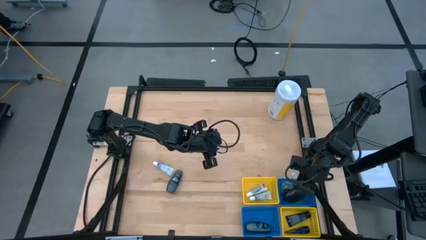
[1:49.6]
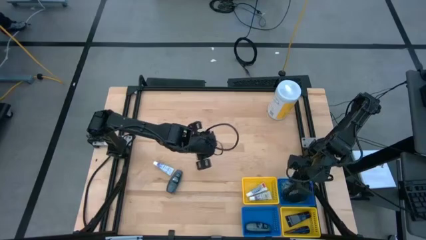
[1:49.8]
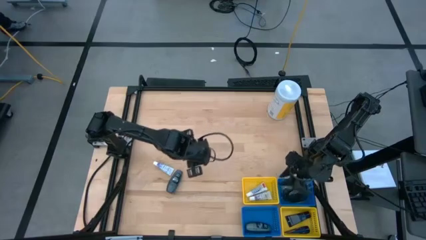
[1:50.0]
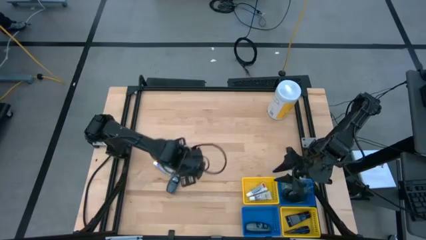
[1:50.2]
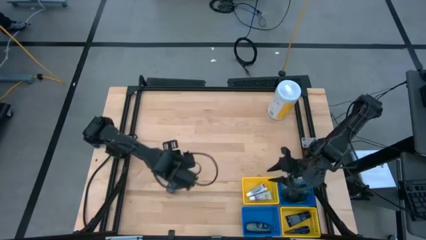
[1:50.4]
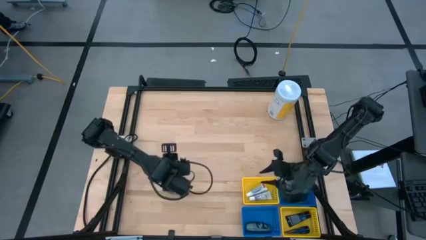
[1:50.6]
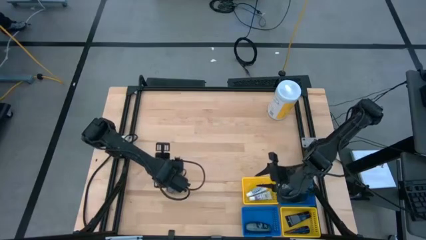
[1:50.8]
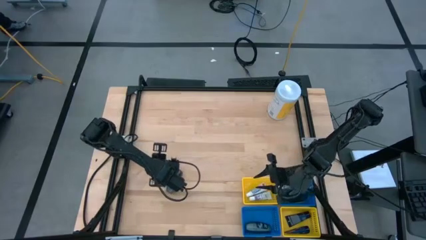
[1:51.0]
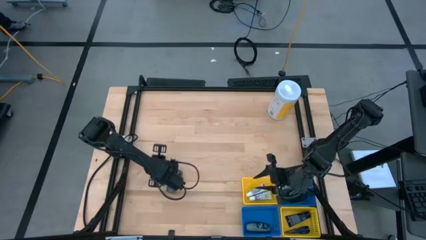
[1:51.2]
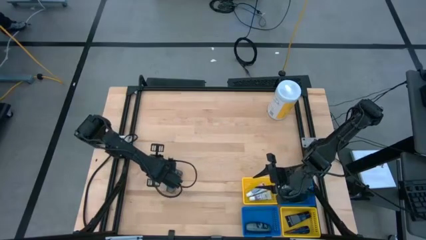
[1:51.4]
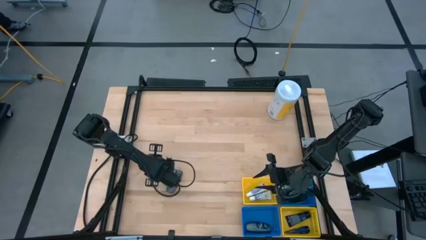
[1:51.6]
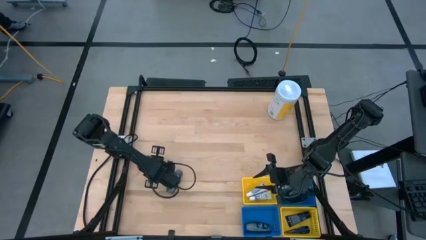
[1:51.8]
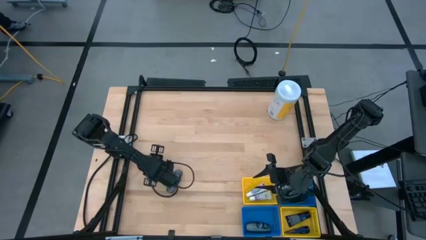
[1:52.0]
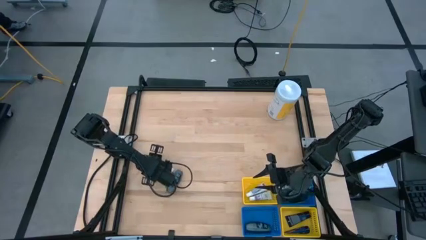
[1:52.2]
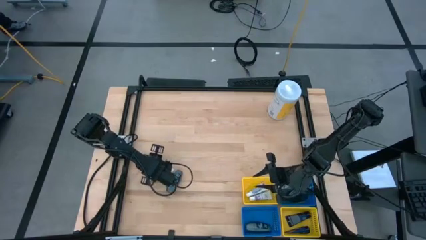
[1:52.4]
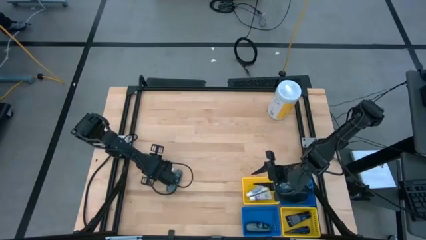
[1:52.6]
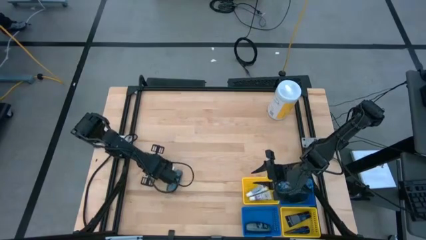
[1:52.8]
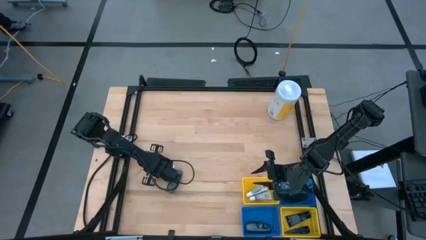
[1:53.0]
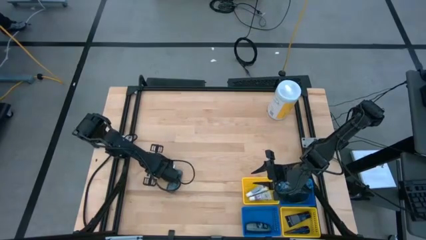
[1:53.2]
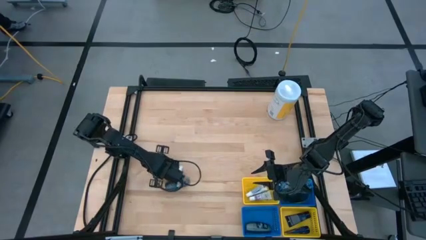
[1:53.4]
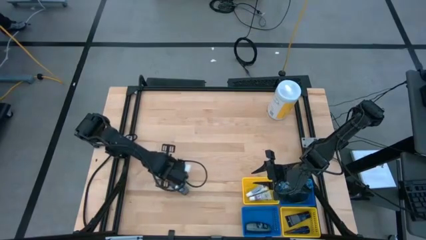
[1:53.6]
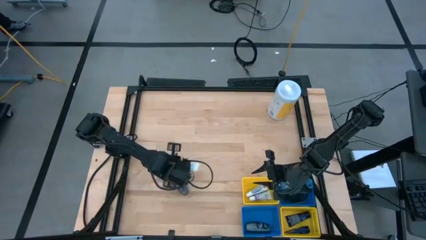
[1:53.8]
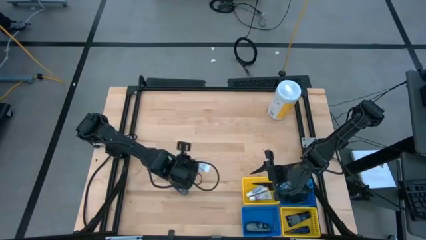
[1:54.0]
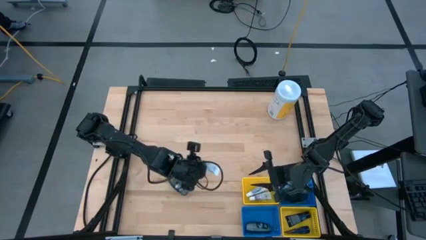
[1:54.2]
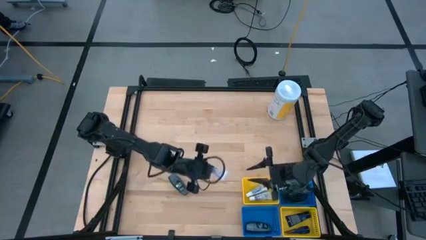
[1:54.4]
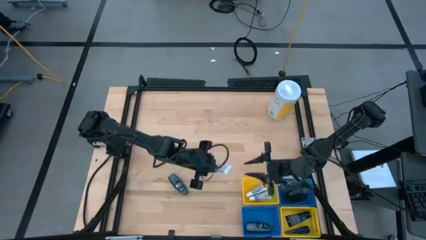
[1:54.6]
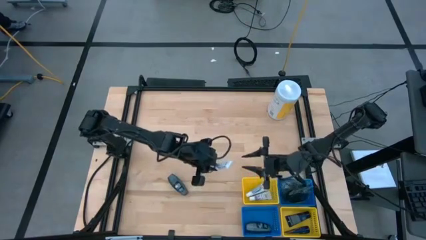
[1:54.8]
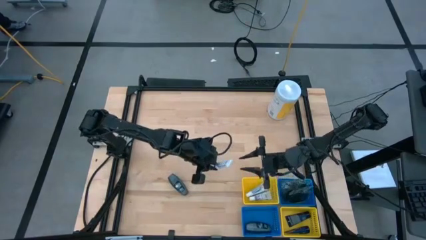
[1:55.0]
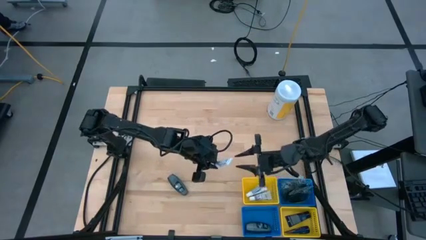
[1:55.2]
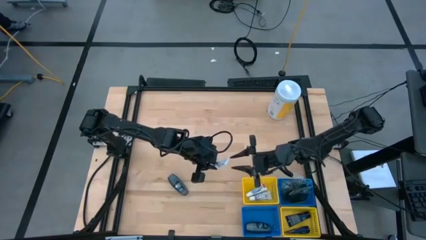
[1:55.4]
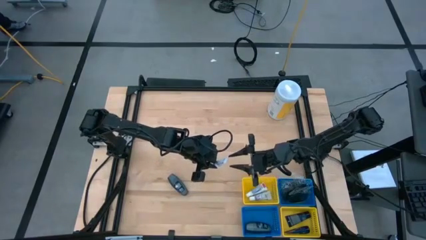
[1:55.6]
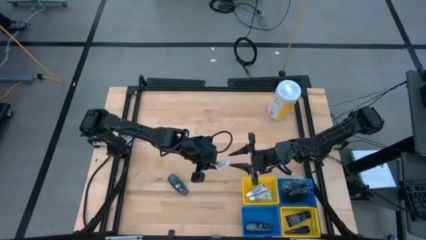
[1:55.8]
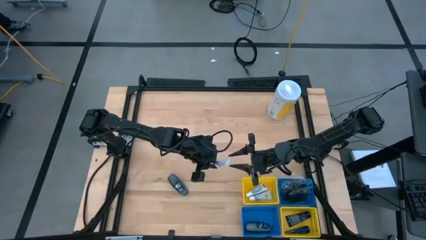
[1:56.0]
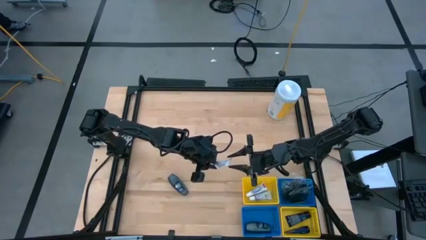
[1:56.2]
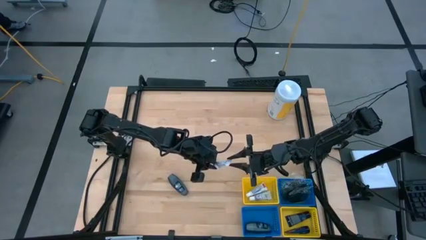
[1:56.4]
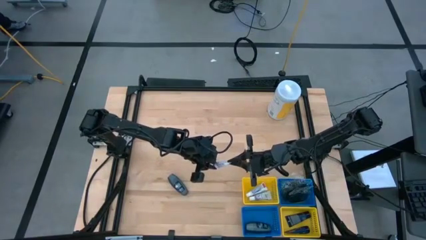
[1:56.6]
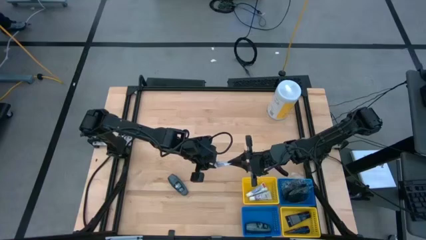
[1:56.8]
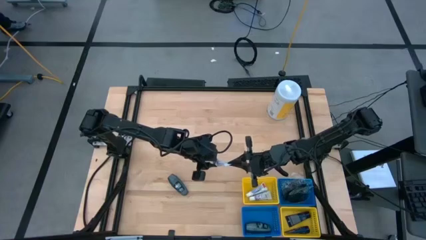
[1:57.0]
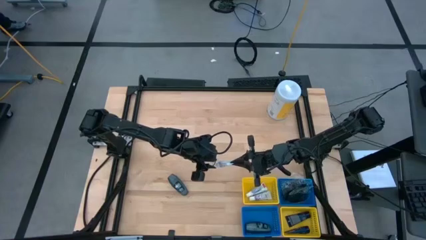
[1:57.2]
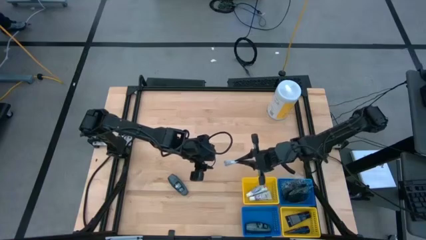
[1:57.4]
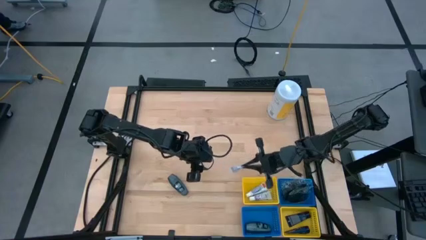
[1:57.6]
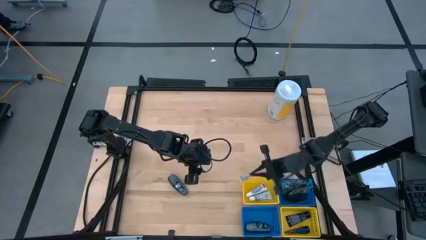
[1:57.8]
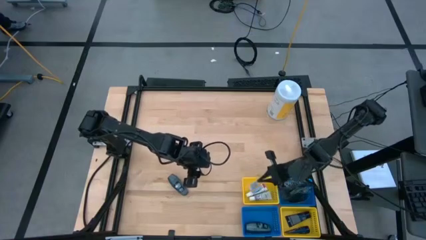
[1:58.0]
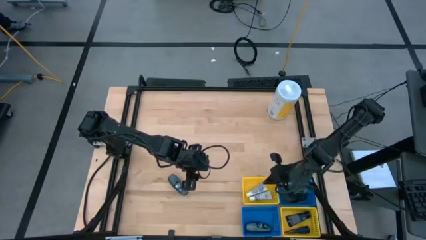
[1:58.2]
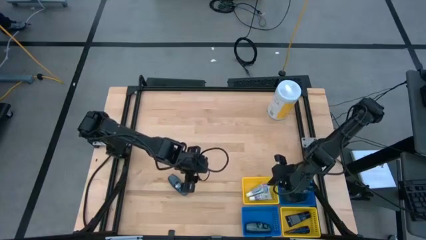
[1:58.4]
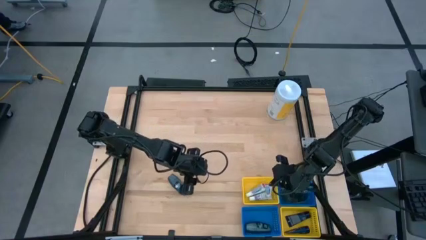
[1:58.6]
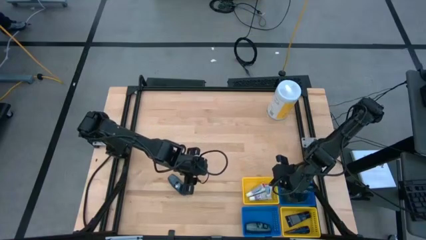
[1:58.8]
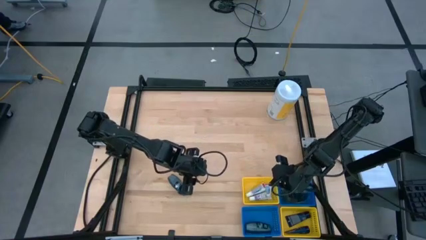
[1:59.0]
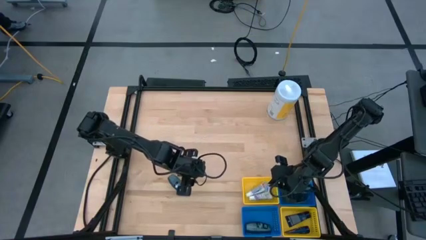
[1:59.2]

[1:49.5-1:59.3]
Task: Pick & Place Travel size toiletries
Put the white toothpaste into the top yellow bin

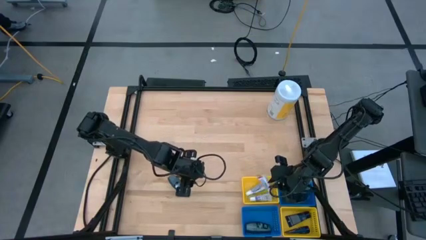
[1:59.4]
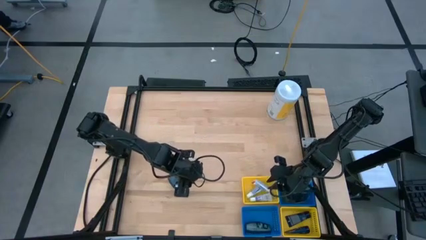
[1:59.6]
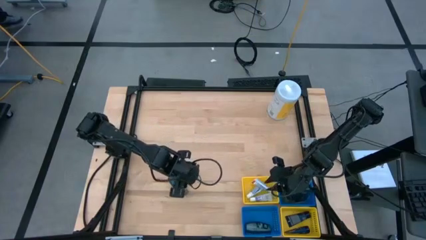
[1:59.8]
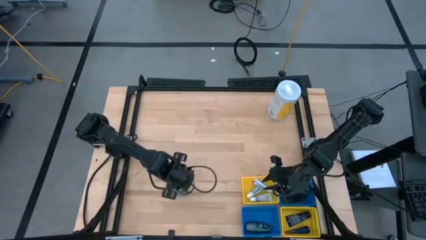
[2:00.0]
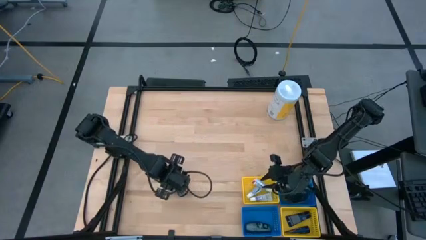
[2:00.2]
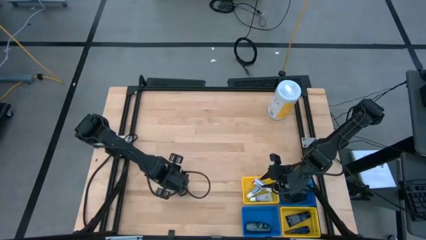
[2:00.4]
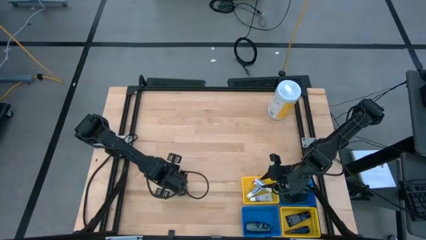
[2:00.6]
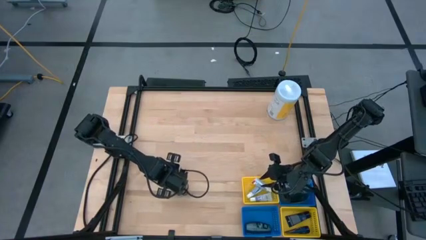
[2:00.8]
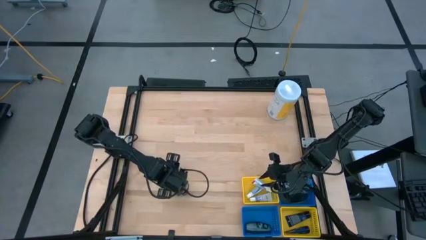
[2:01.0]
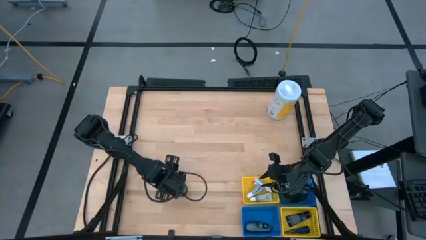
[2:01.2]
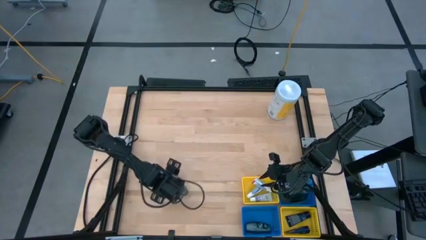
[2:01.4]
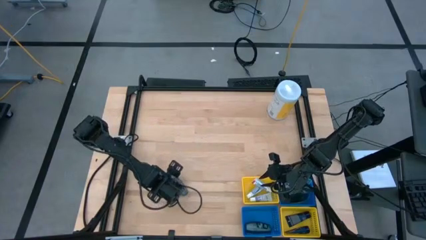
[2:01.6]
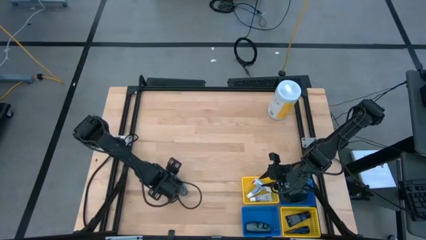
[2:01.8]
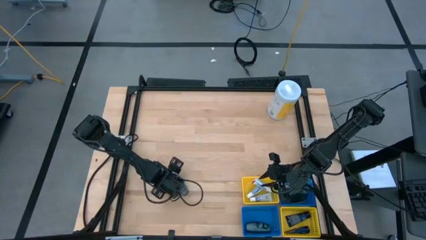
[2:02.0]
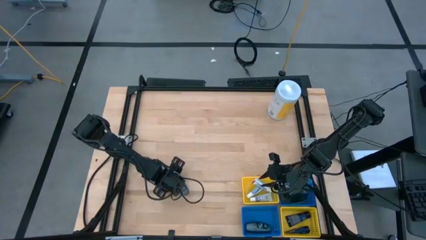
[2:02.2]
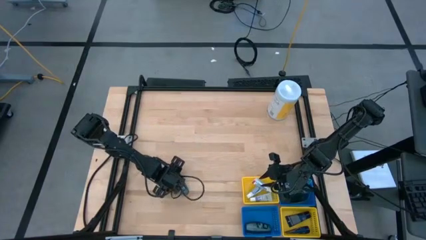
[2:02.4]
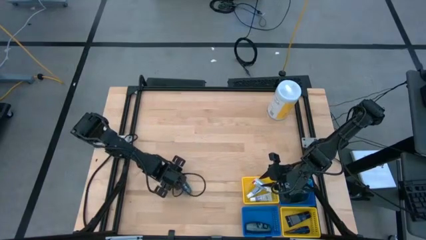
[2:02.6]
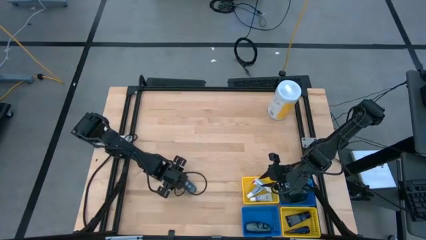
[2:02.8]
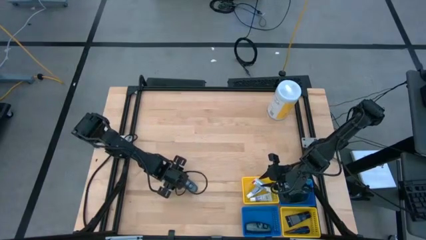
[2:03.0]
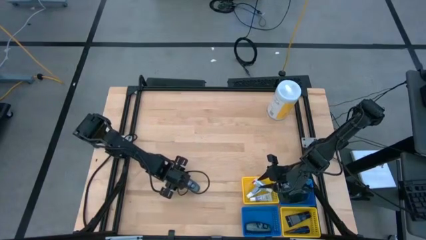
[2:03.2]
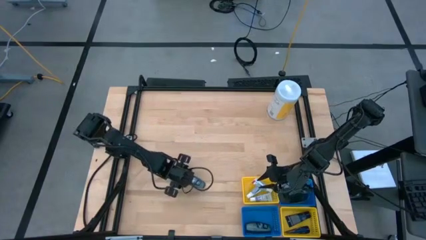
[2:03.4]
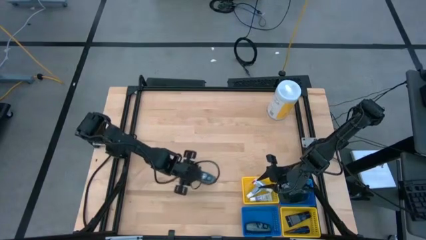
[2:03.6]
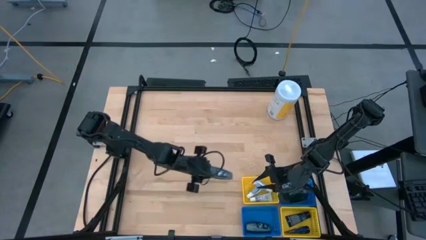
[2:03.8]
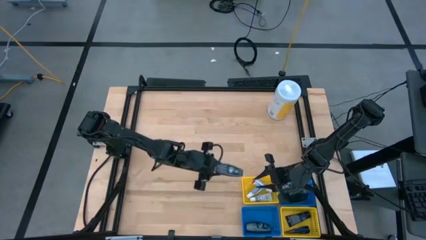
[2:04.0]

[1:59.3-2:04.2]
Put the black deodorant into the bottom blue bin

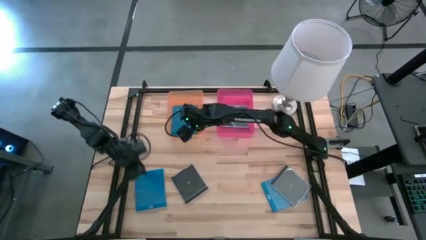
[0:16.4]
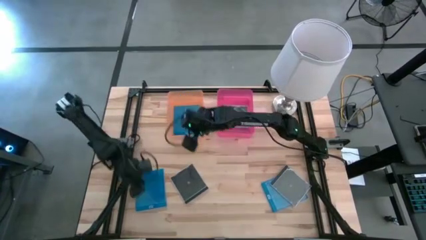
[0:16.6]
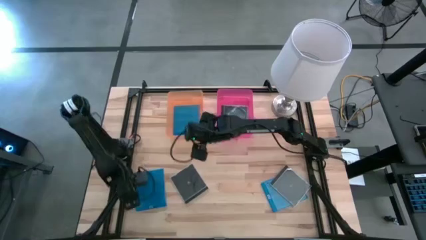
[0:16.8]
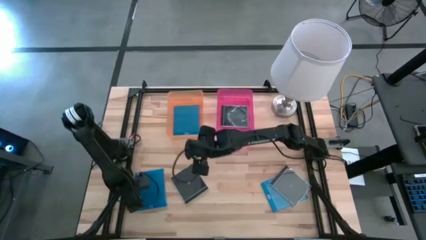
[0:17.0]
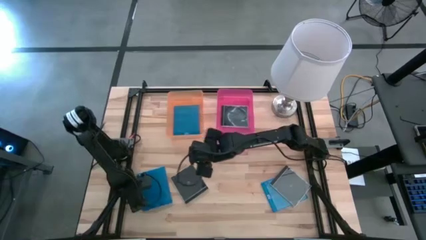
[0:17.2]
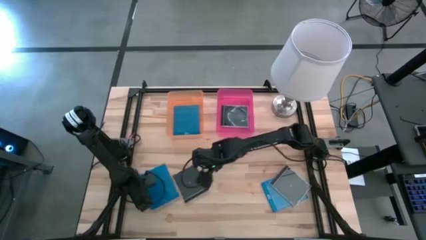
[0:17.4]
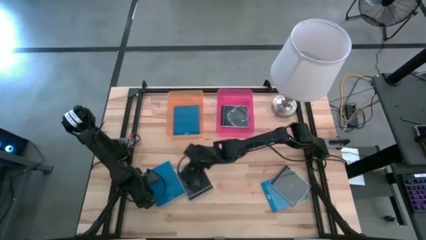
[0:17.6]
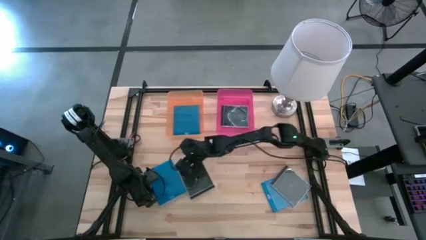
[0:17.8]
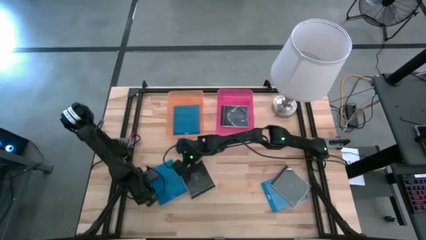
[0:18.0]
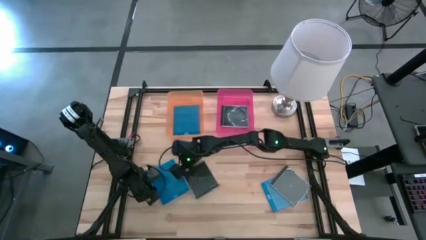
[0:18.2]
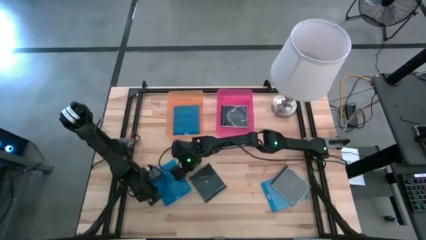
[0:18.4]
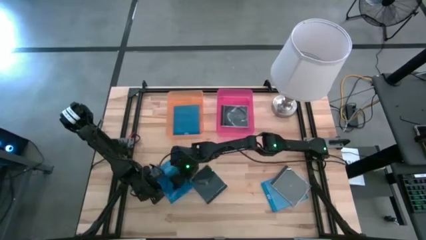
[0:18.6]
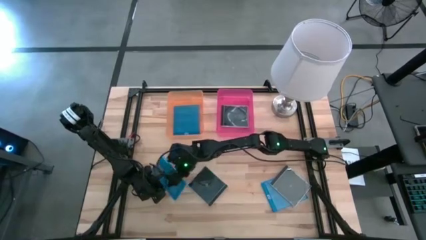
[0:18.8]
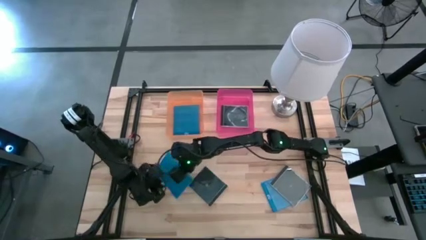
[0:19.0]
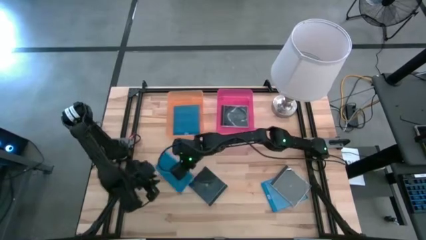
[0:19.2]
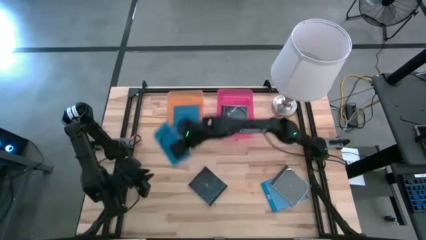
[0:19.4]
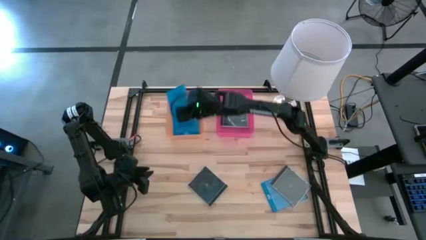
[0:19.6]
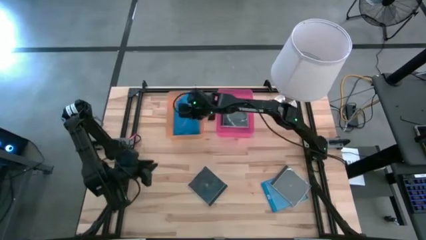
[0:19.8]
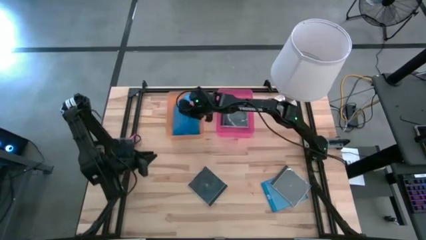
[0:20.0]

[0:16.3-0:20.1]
Task: Pick & place jewel cases by type
Put the left blue CD case into the orange bin
